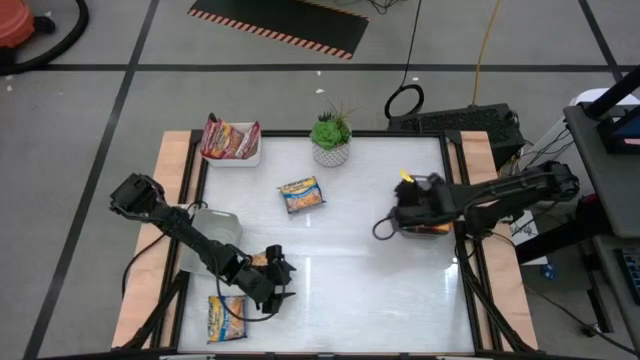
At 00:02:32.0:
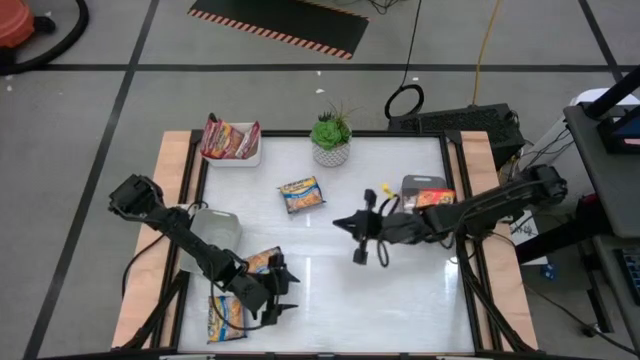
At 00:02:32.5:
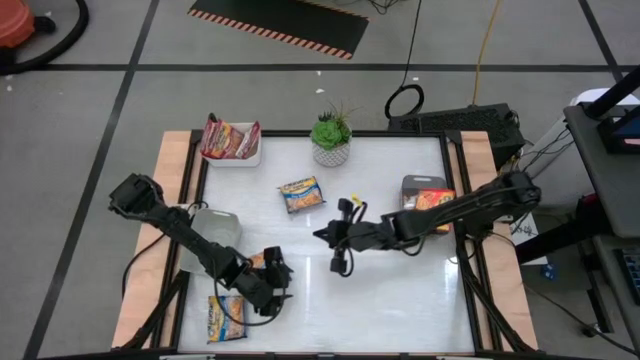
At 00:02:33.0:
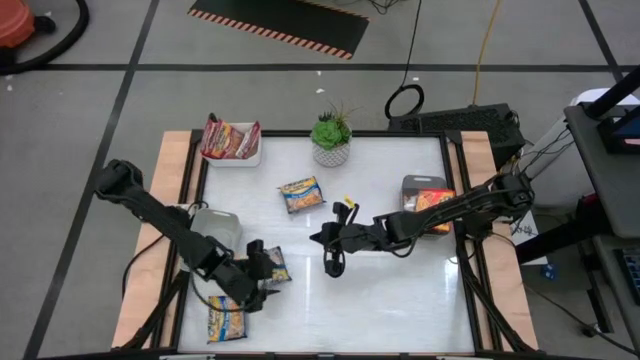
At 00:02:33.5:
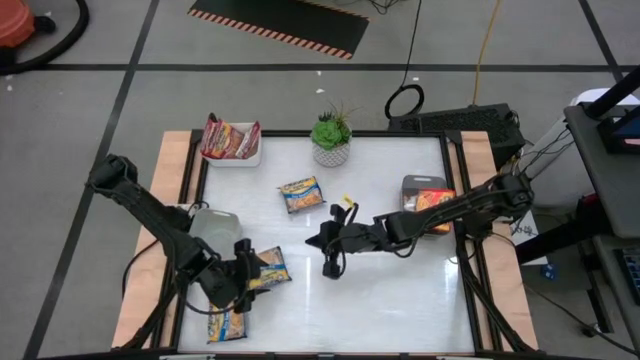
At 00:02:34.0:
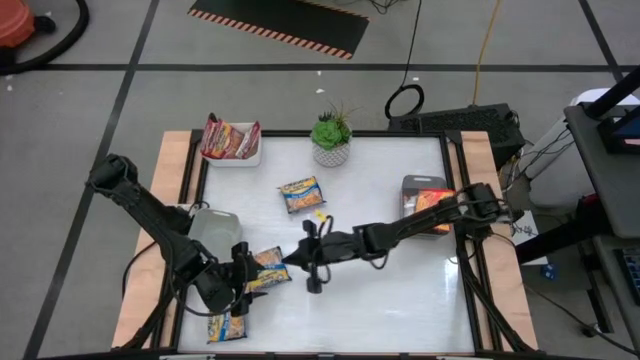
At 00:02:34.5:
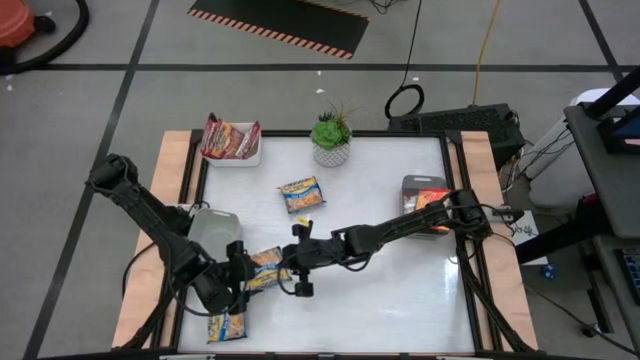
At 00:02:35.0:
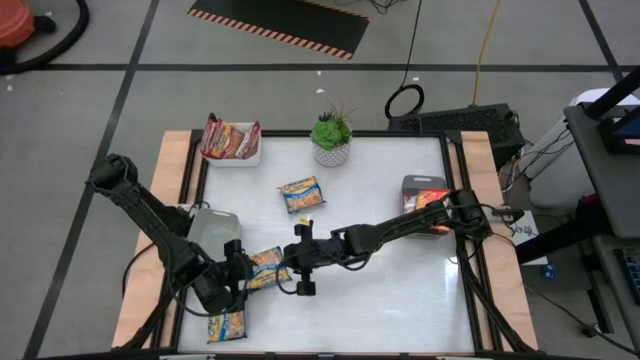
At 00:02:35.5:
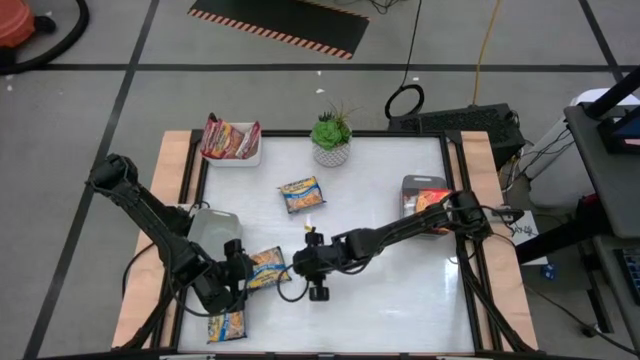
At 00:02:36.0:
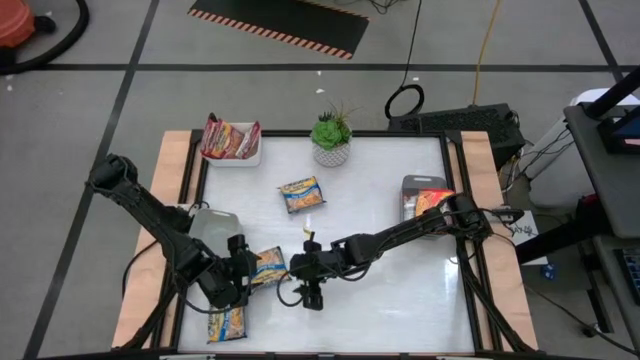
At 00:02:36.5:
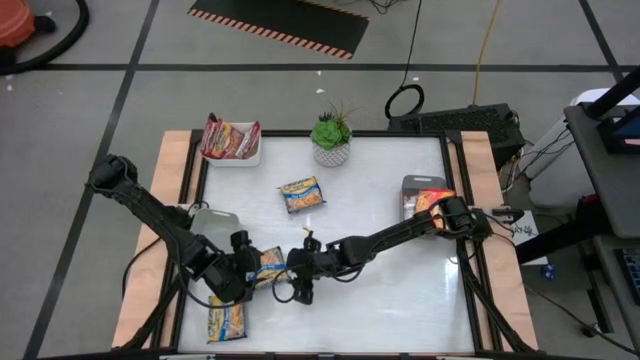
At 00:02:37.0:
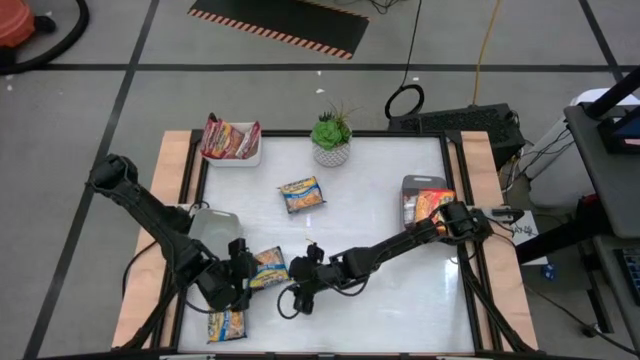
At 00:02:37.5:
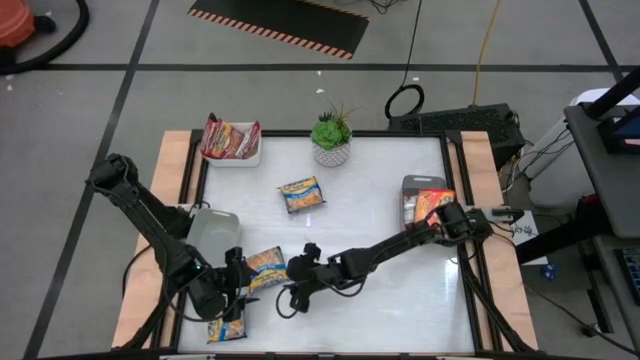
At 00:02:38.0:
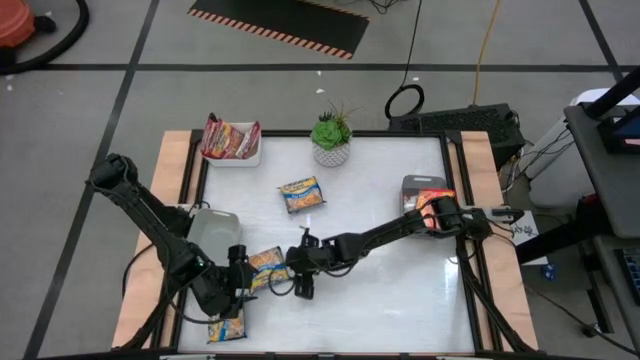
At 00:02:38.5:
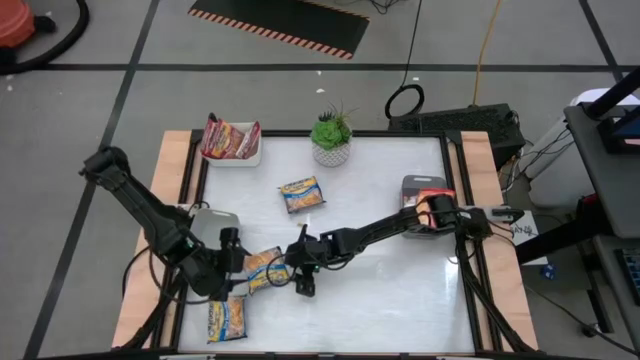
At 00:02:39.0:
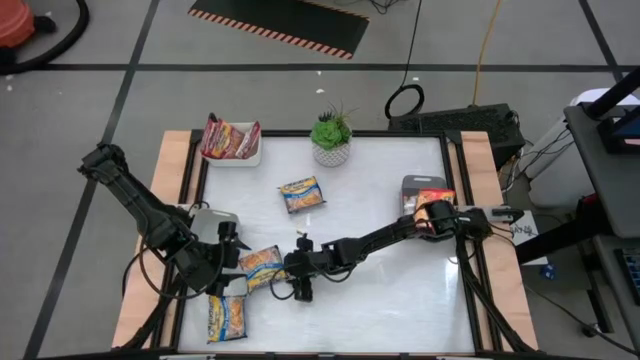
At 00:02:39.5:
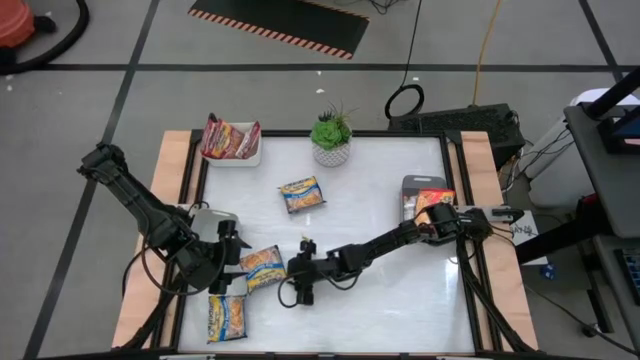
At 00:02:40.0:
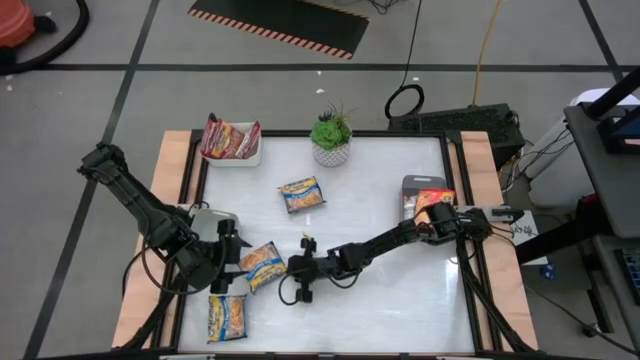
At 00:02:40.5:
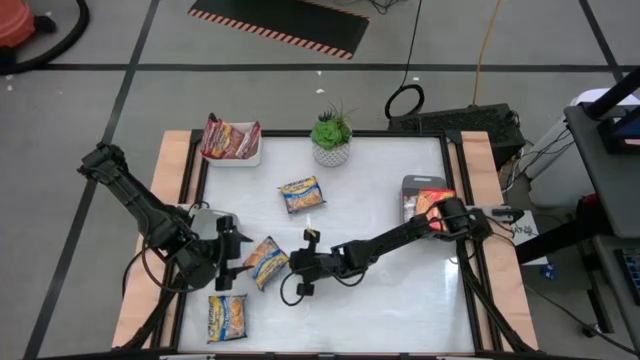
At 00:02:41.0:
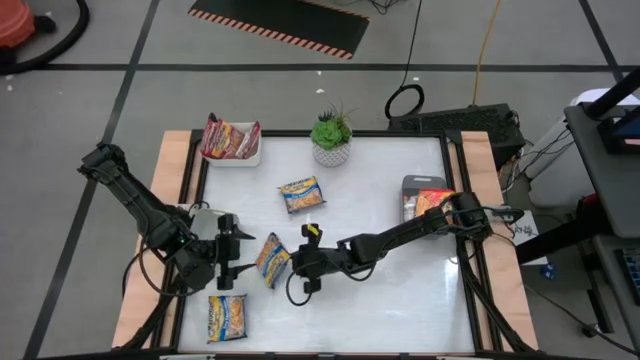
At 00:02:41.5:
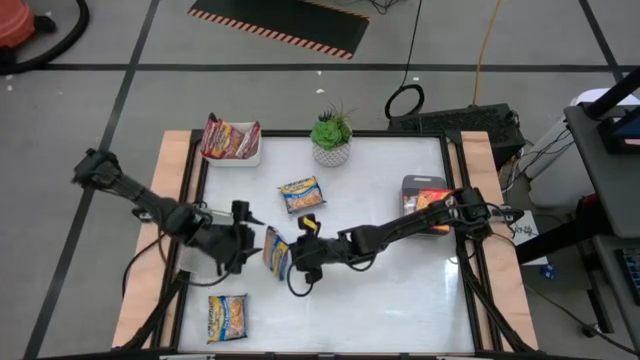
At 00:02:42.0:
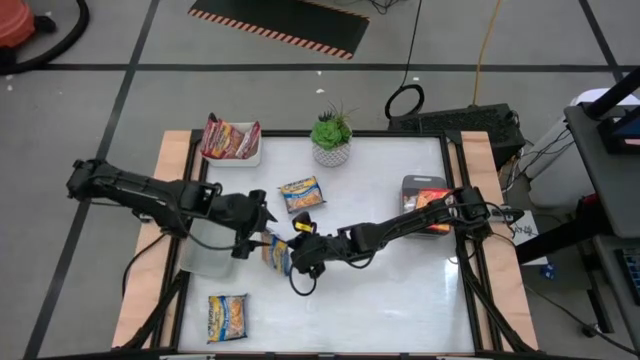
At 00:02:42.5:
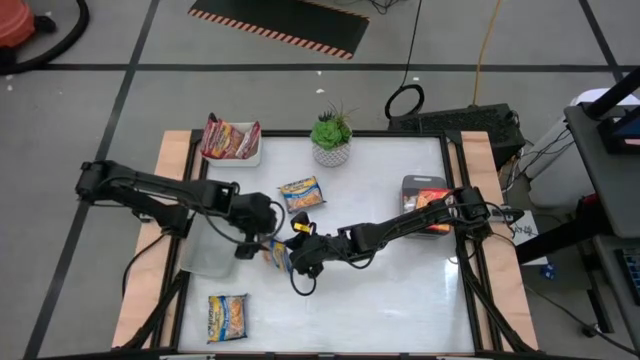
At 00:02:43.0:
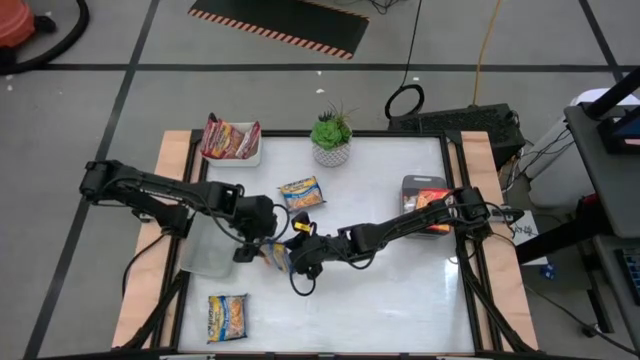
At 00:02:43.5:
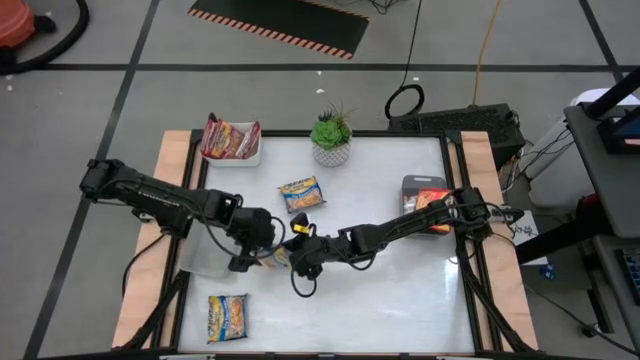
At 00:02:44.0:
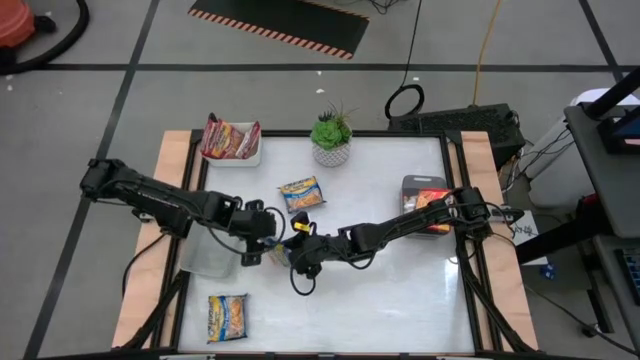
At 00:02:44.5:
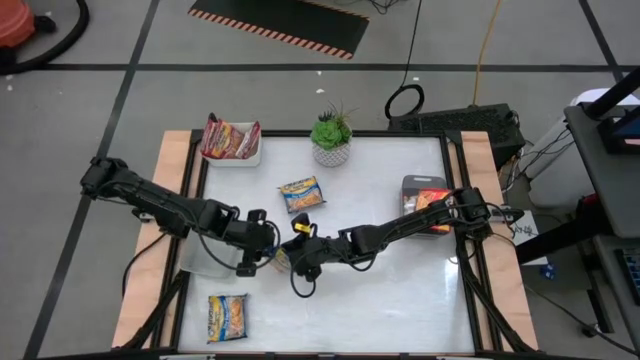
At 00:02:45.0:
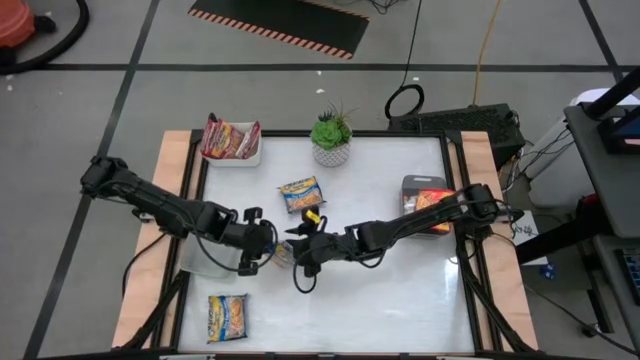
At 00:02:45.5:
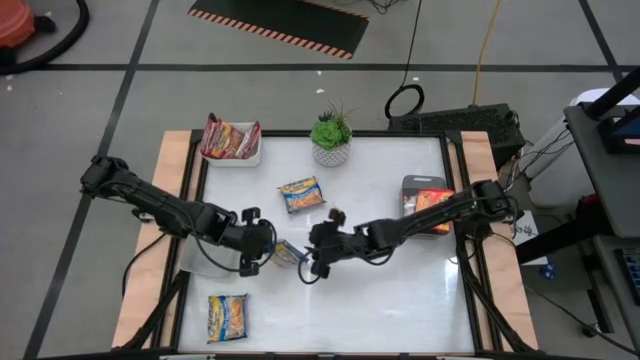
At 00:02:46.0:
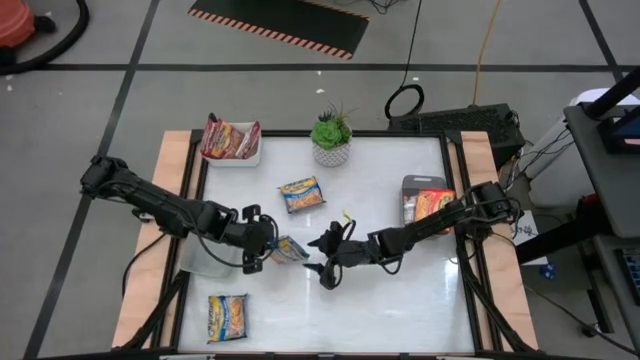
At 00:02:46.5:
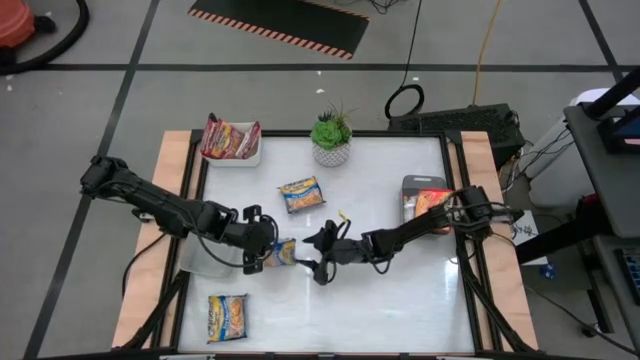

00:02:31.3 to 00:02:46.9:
Task: Sort Maruchan noodles
Put the middle blue noodle pack into the gray bin

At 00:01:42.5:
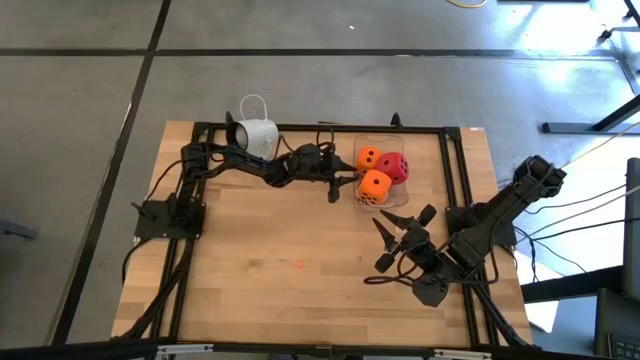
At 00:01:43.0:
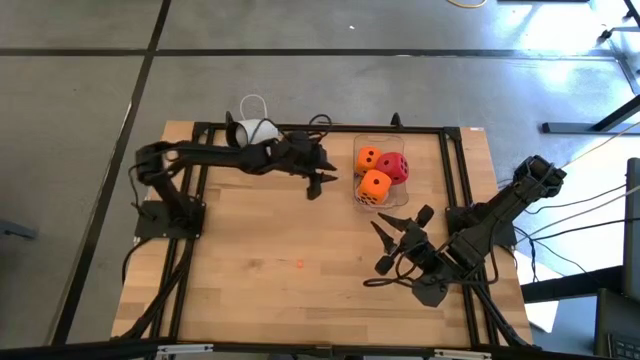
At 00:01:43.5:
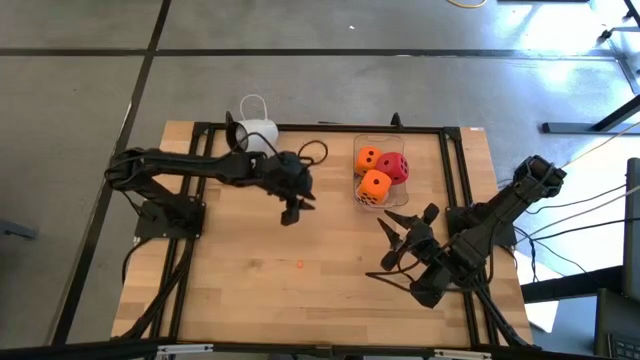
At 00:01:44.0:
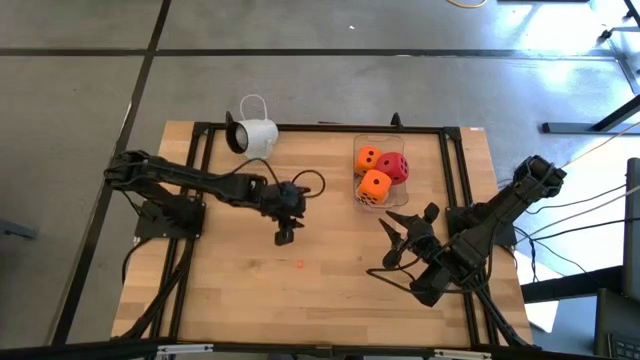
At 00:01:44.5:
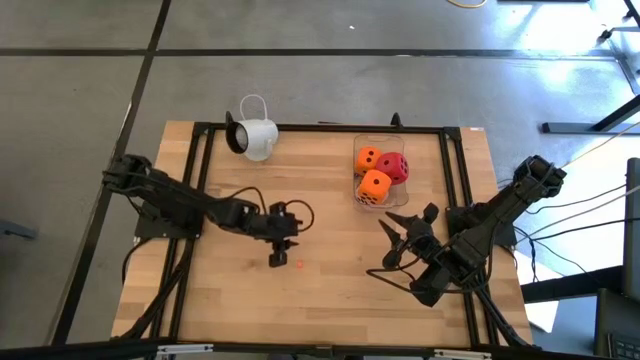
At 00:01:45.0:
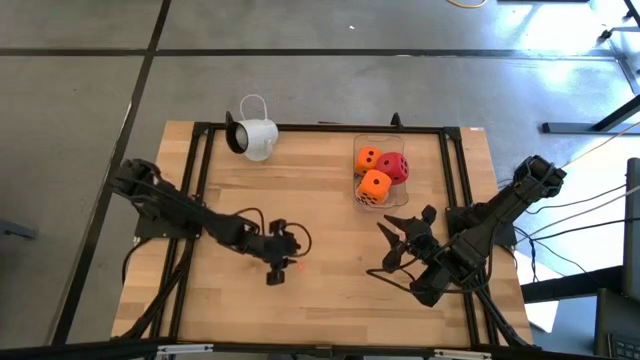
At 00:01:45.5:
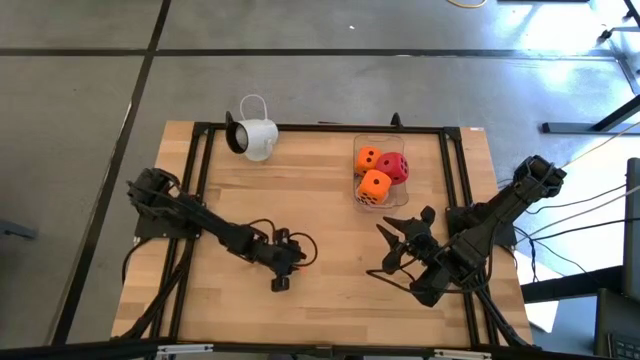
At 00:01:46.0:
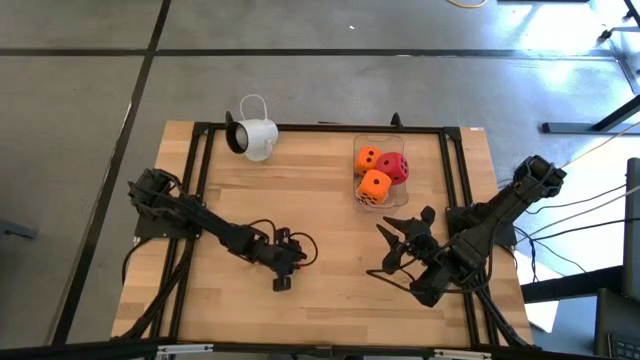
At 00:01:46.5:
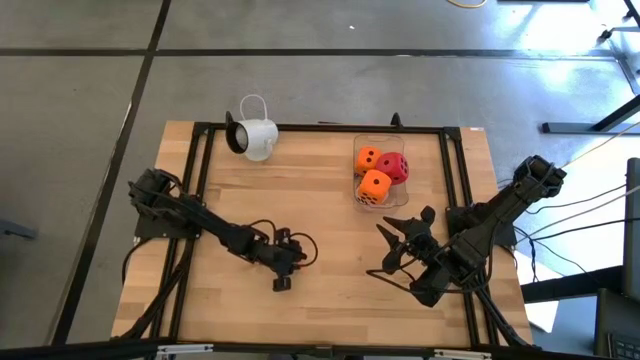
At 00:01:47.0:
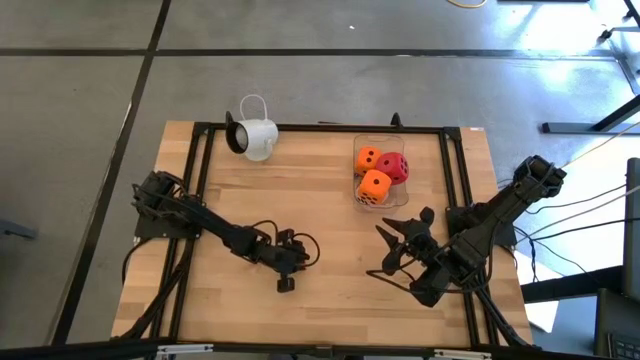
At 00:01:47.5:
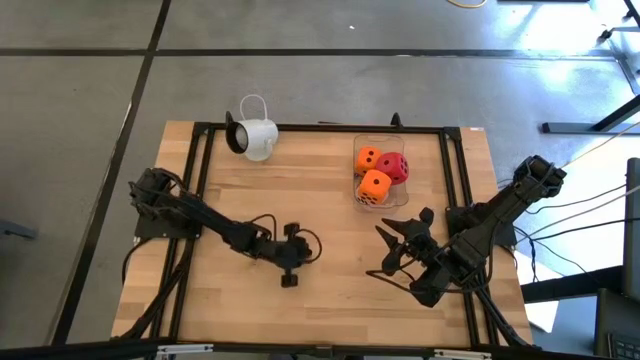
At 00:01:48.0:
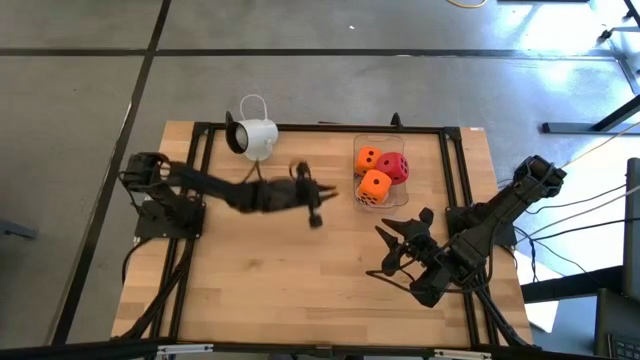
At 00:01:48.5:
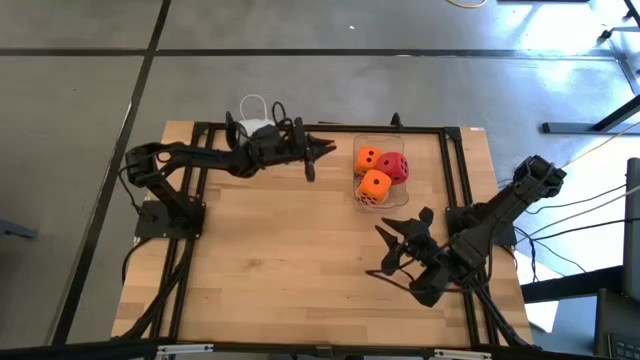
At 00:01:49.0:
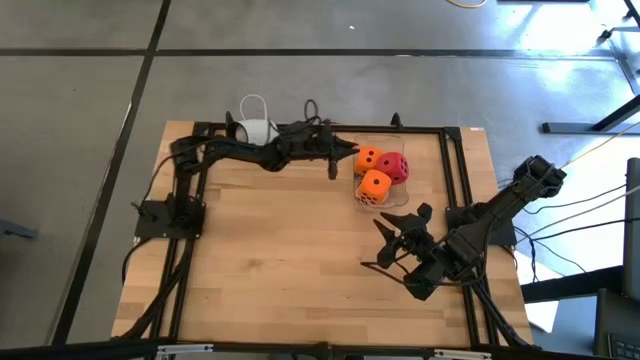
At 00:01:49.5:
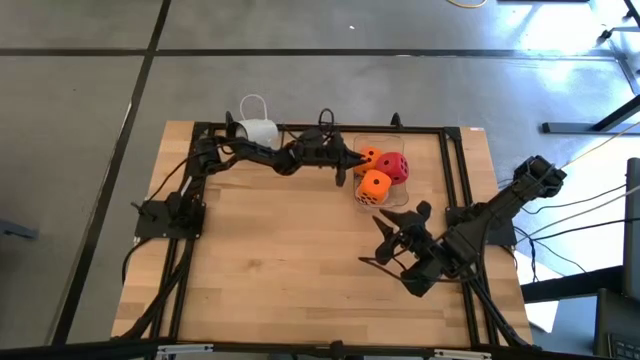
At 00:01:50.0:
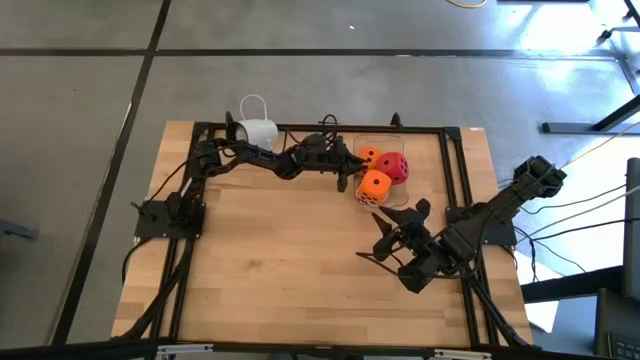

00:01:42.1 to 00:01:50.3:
Task: Pick & Place Dice
Put the small orange die into the transparent bin
